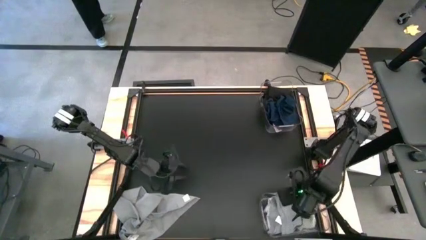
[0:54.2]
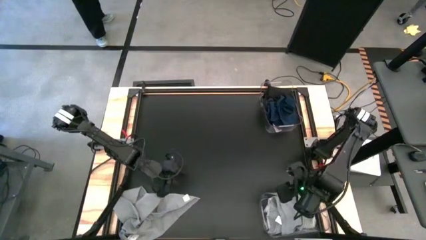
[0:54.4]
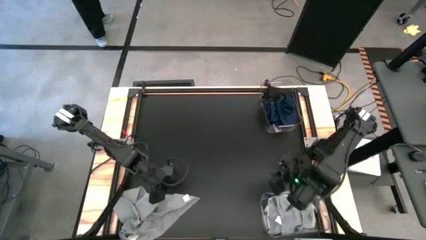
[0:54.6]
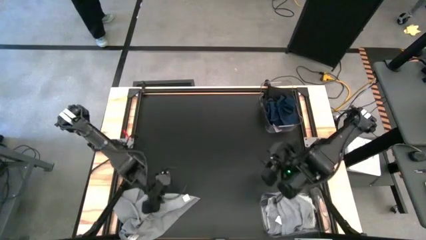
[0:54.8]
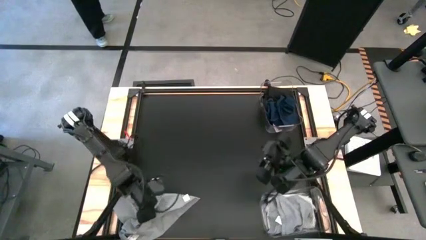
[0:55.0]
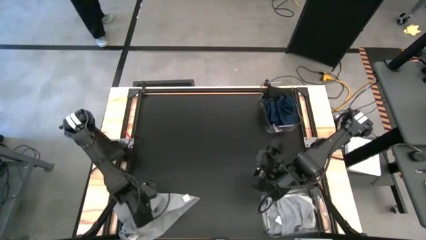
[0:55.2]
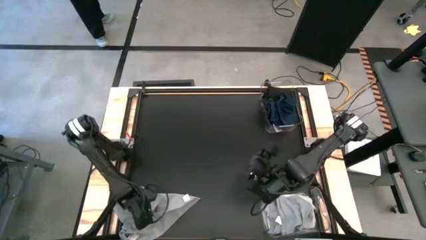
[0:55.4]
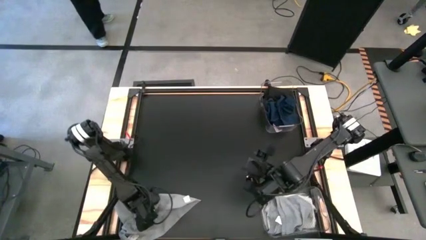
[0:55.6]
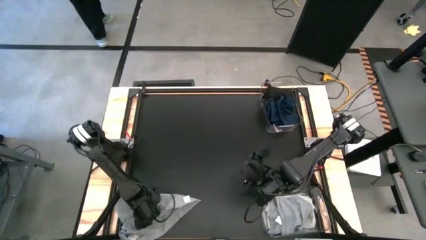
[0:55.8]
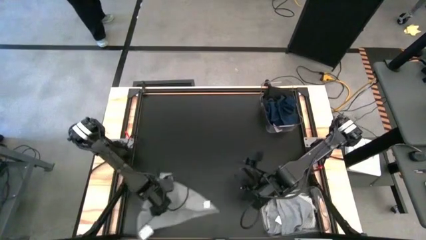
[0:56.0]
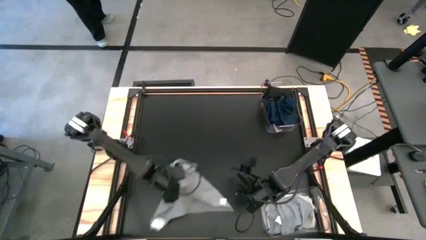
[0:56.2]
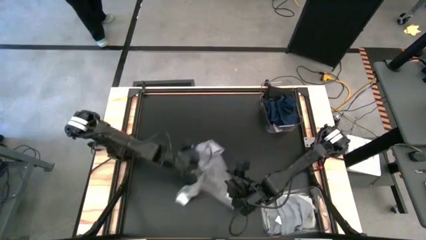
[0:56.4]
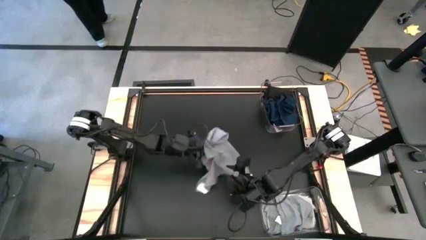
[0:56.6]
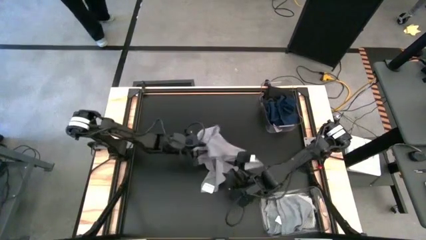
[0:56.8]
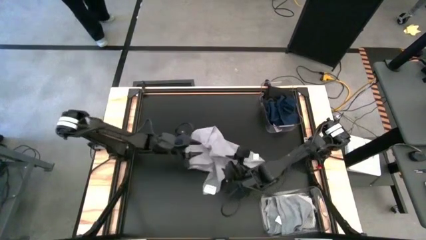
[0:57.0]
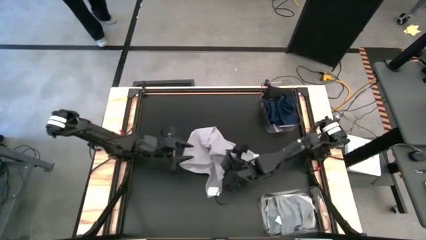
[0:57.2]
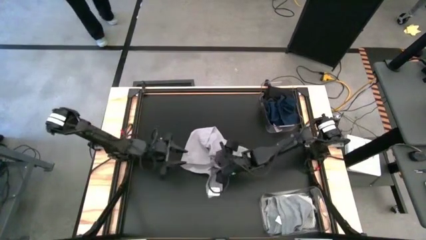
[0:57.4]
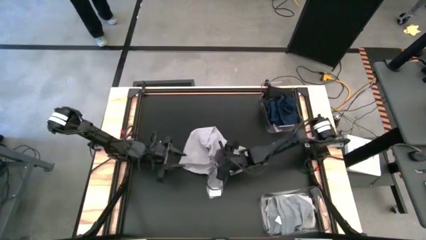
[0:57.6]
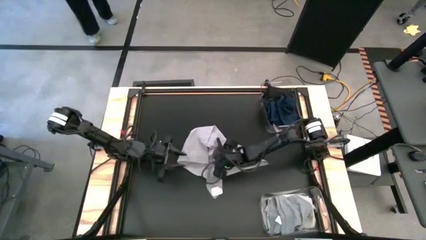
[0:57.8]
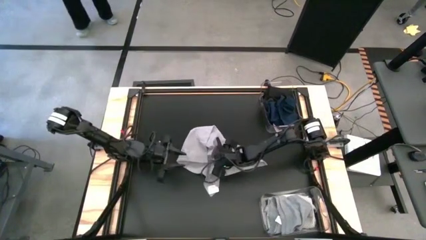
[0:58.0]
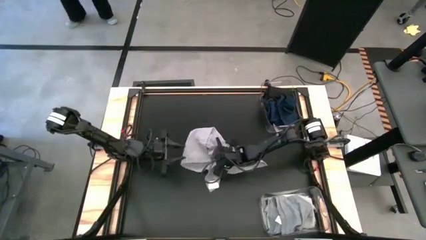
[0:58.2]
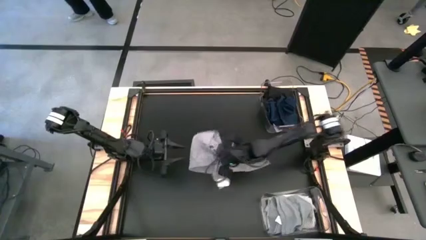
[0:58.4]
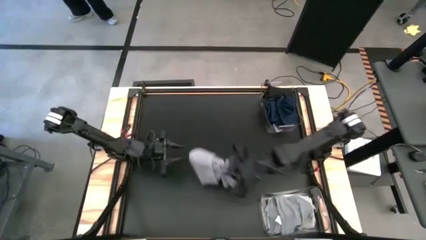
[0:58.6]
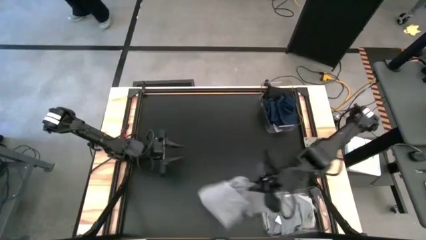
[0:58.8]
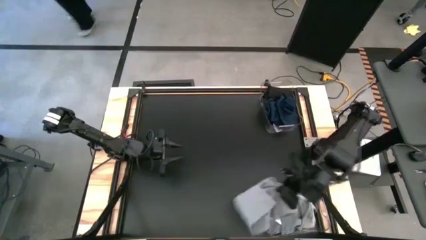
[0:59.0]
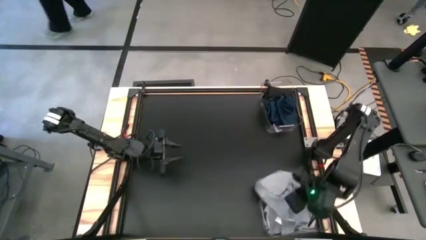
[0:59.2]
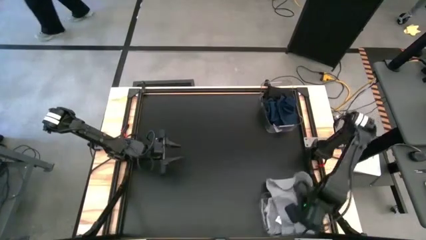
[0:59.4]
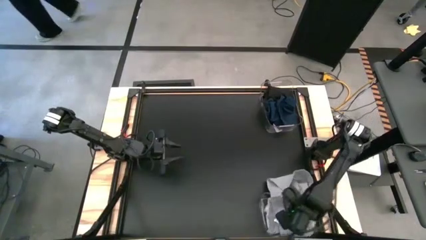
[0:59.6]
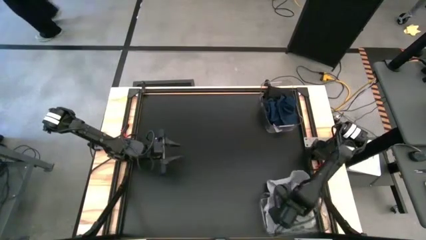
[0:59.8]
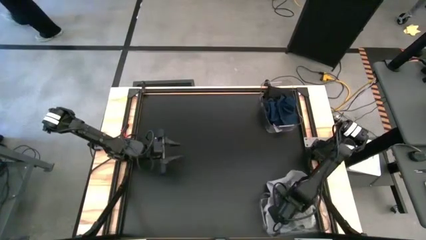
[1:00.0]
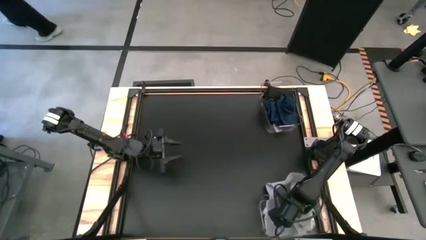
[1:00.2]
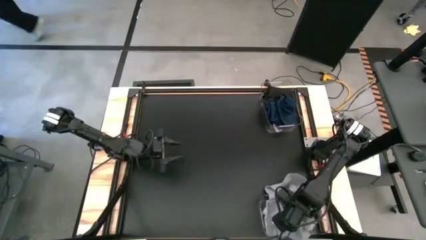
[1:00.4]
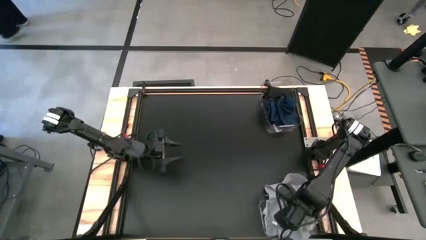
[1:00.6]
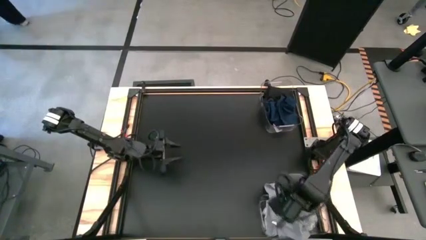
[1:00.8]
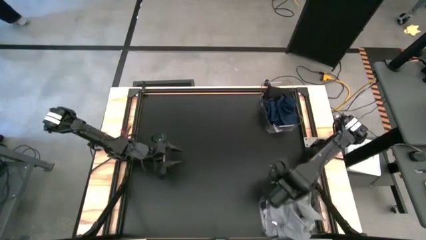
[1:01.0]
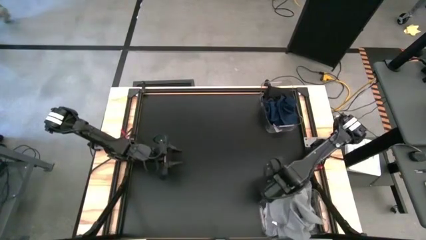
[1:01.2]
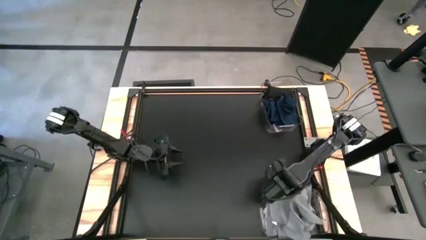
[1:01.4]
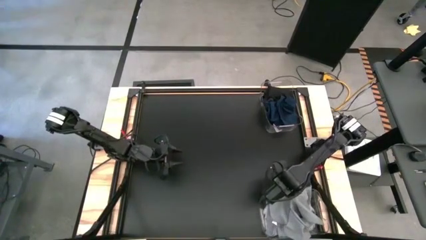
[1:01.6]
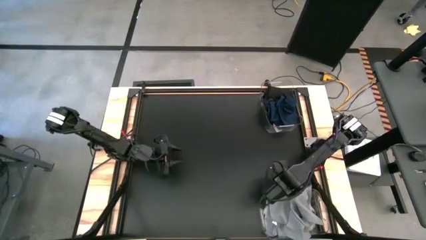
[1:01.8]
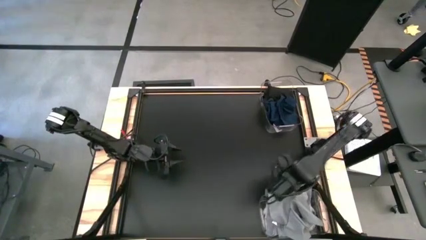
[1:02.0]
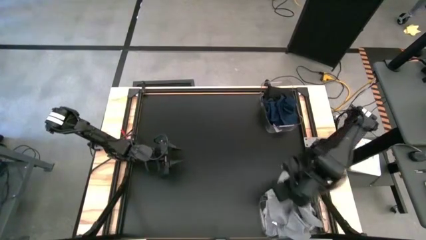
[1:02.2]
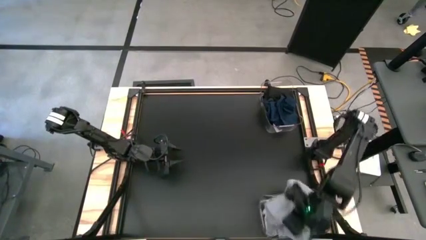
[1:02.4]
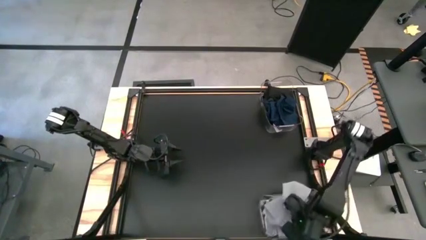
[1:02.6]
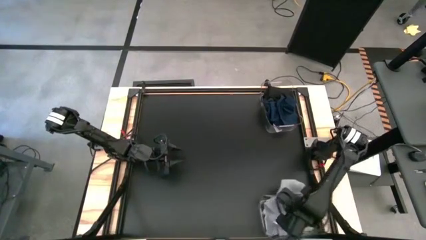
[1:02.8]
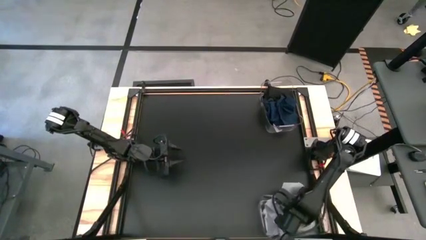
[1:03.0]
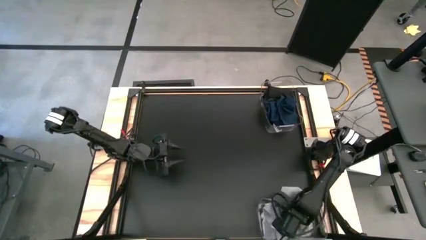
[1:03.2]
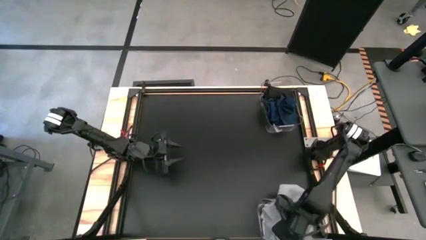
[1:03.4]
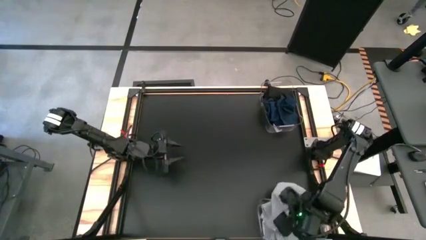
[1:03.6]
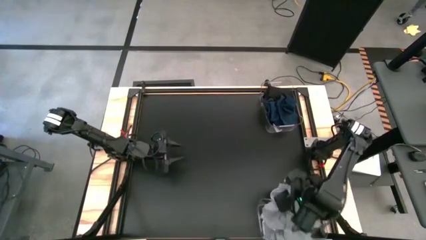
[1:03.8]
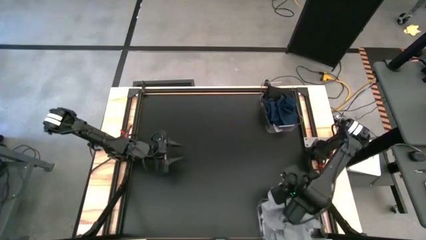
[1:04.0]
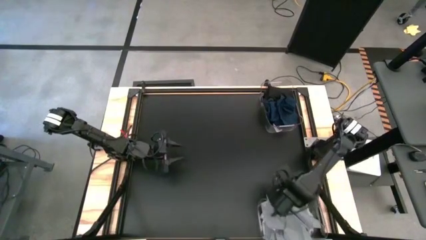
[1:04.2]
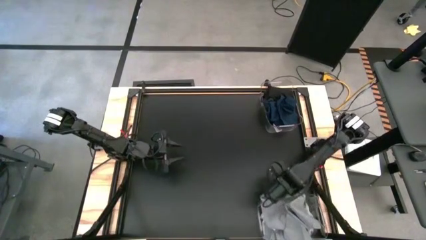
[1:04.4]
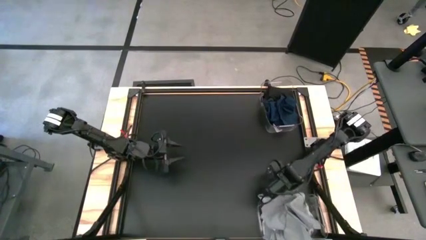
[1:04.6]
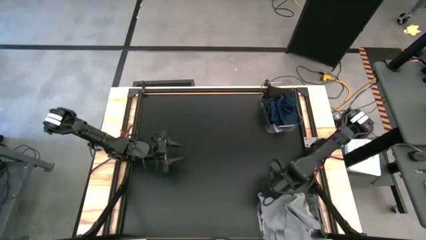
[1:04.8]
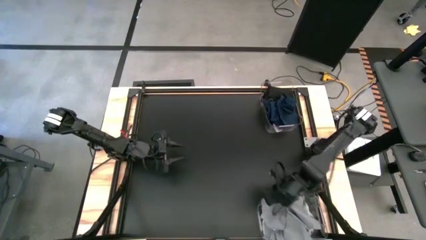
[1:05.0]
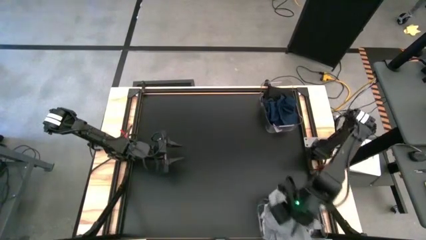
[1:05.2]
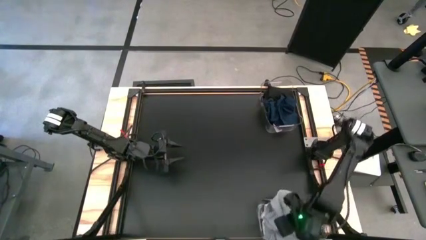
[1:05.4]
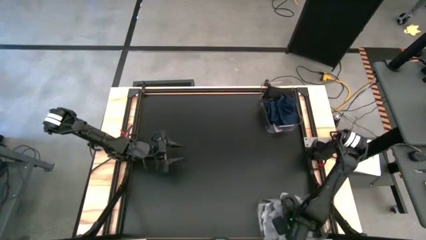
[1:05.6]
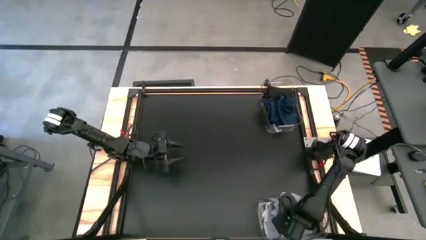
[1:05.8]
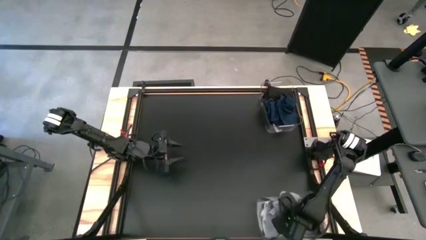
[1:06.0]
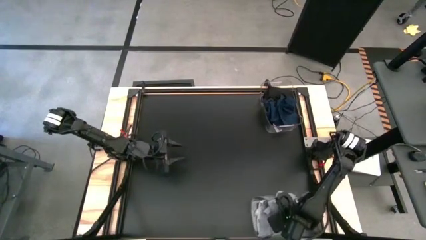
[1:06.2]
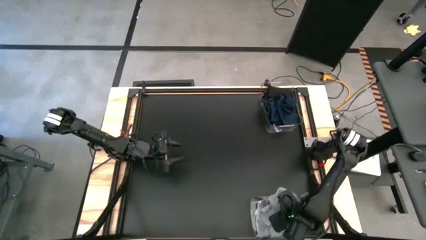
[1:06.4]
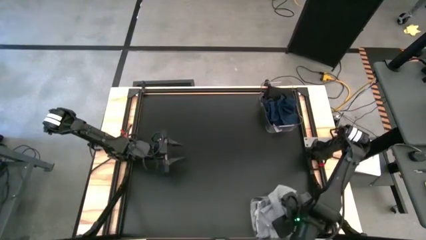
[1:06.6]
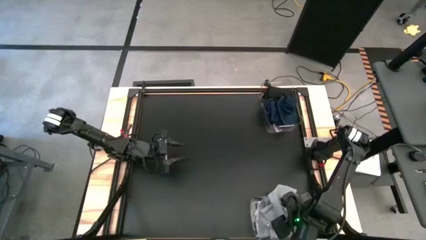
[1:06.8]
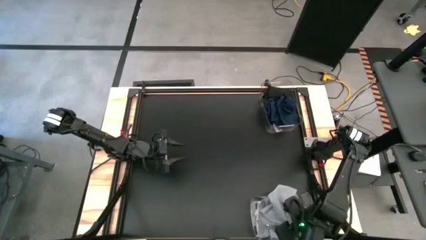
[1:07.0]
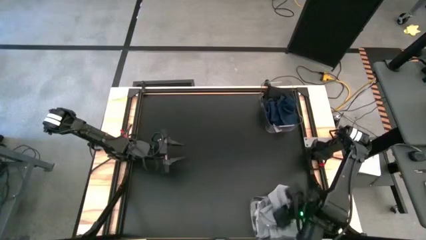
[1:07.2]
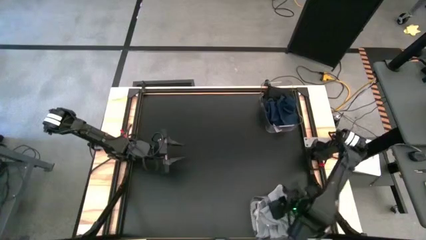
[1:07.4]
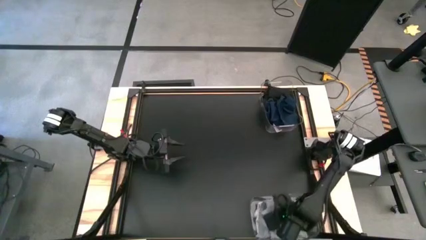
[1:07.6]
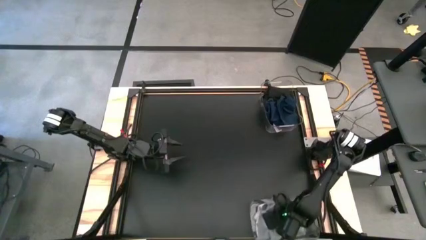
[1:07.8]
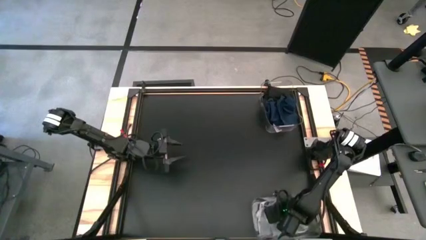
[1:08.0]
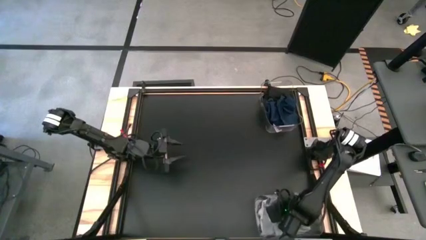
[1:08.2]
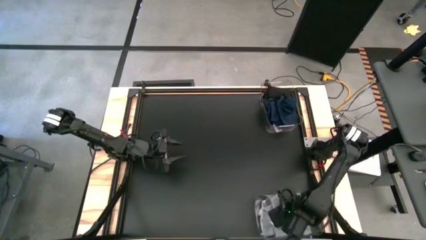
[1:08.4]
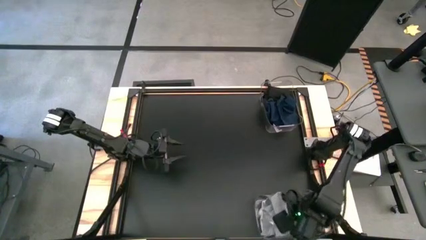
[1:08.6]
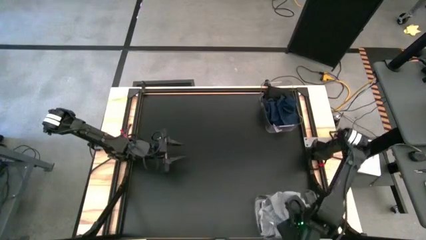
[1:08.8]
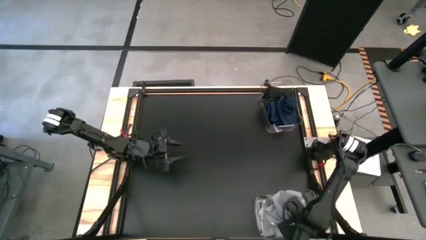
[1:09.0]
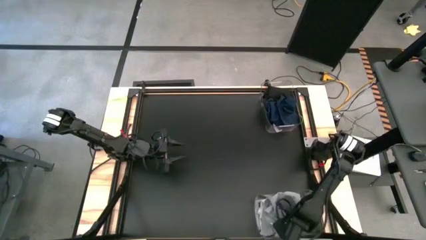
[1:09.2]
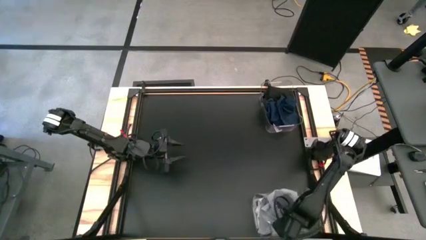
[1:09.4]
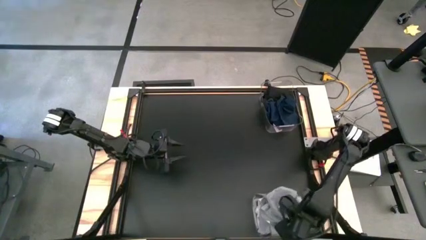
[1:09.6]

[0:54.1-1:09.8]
Task: Sort towels by color in basket
Put the gray towel into the bottom transparent bin
